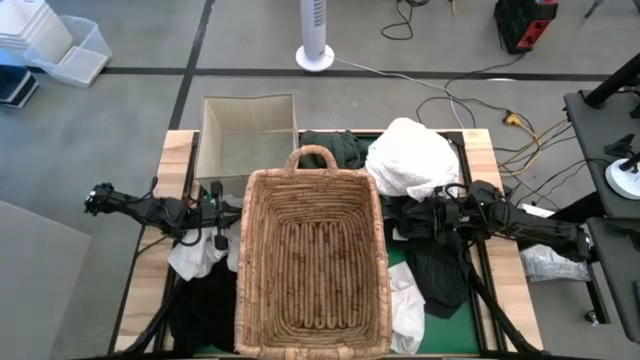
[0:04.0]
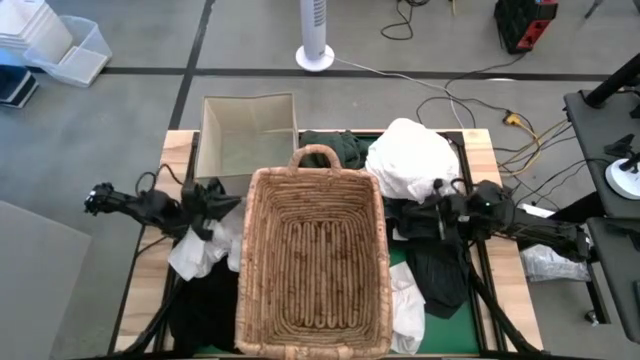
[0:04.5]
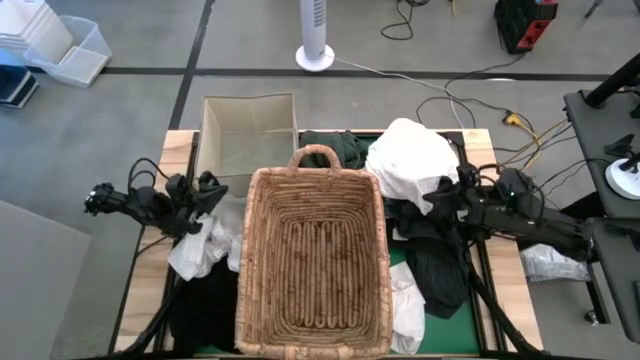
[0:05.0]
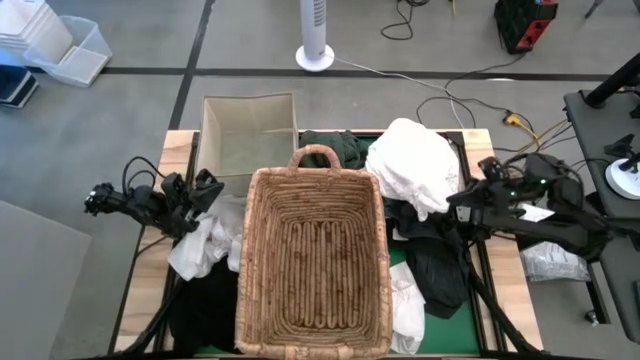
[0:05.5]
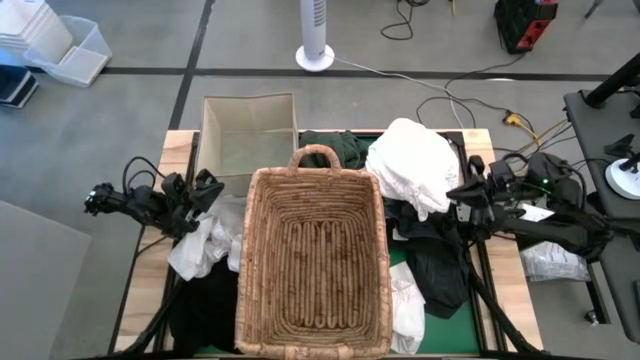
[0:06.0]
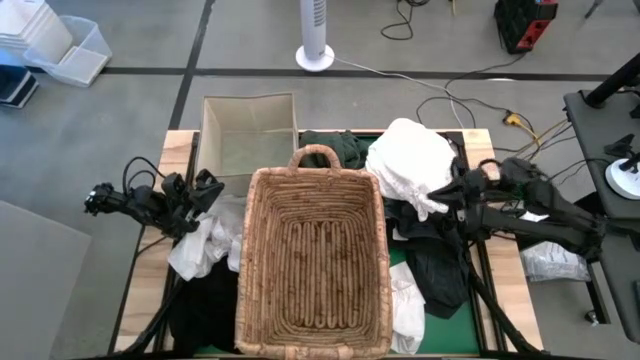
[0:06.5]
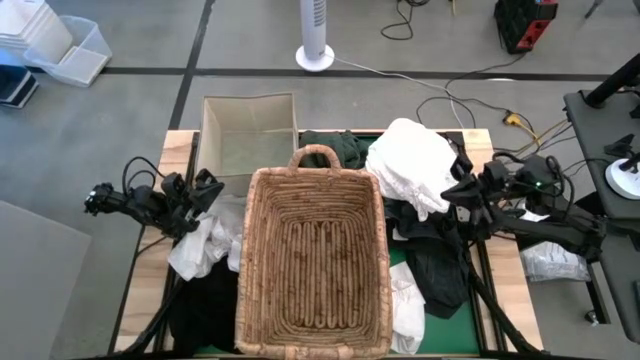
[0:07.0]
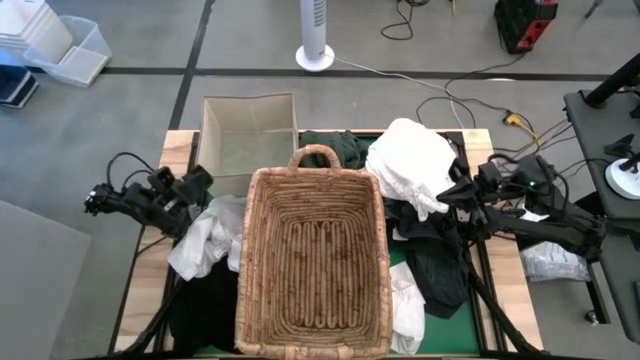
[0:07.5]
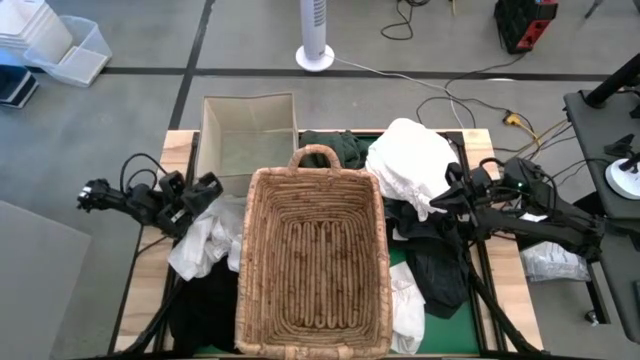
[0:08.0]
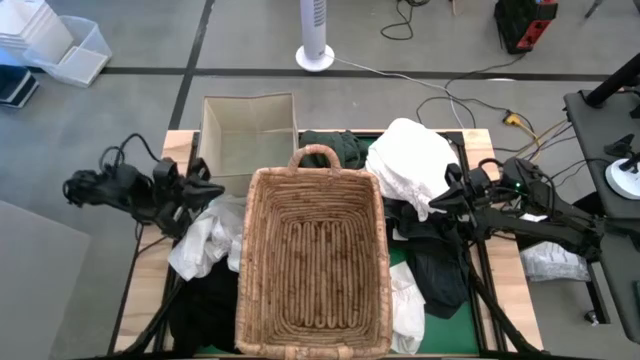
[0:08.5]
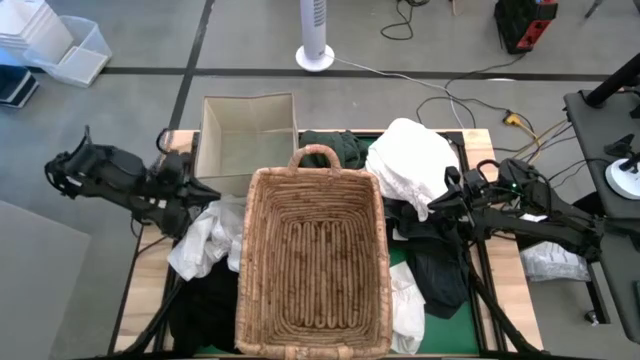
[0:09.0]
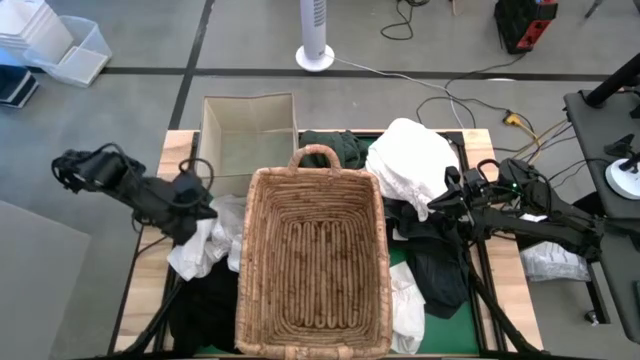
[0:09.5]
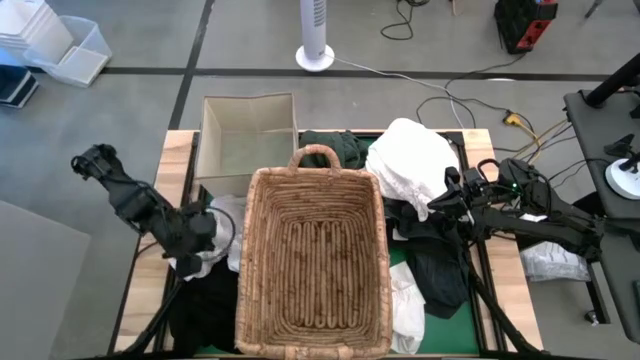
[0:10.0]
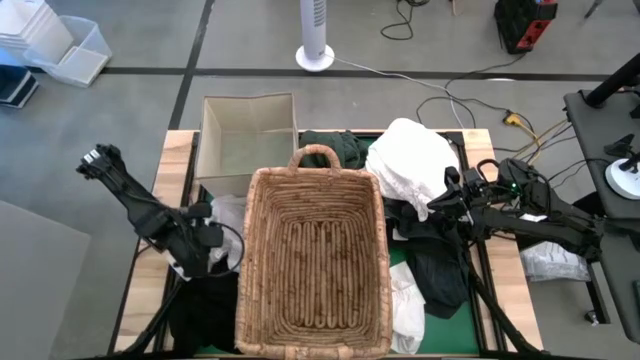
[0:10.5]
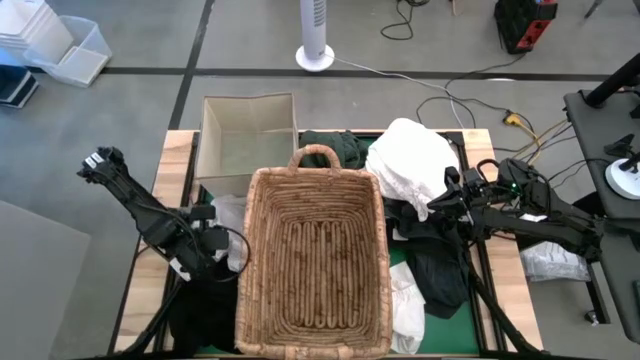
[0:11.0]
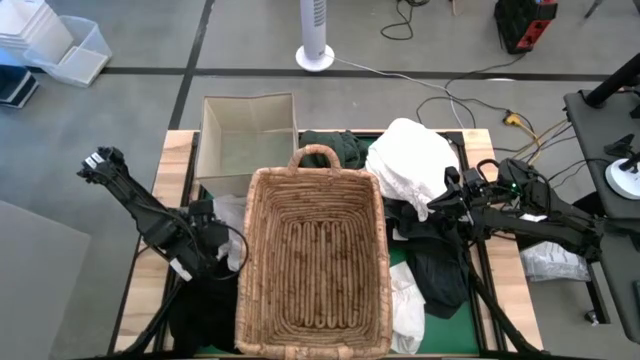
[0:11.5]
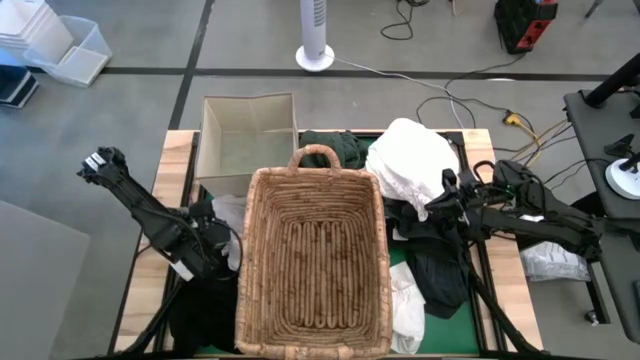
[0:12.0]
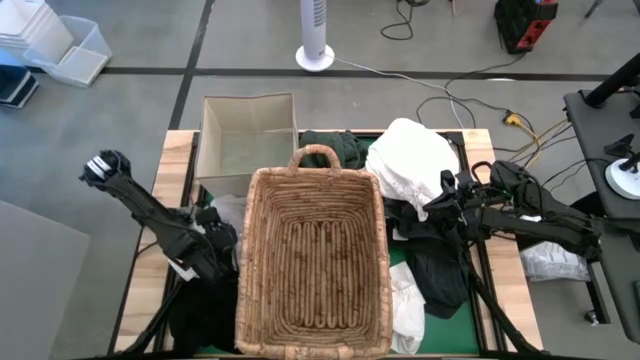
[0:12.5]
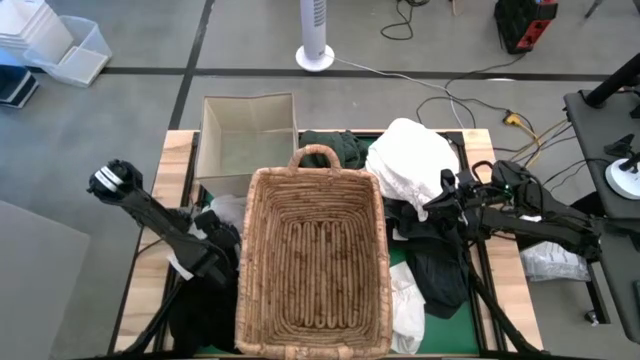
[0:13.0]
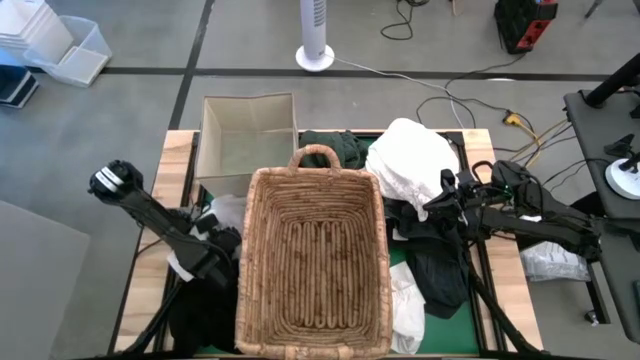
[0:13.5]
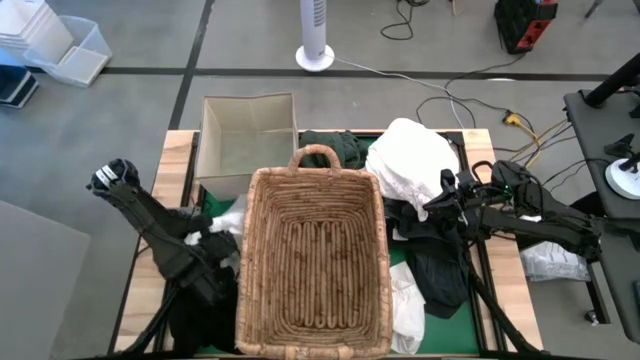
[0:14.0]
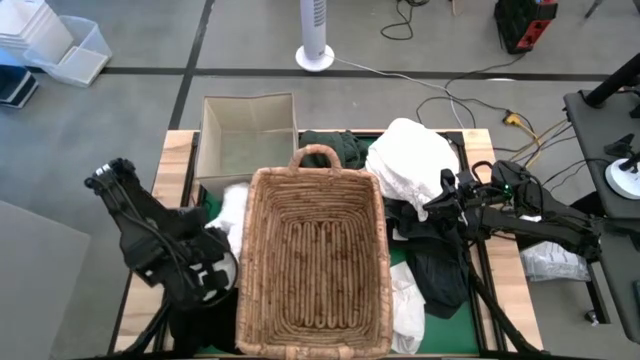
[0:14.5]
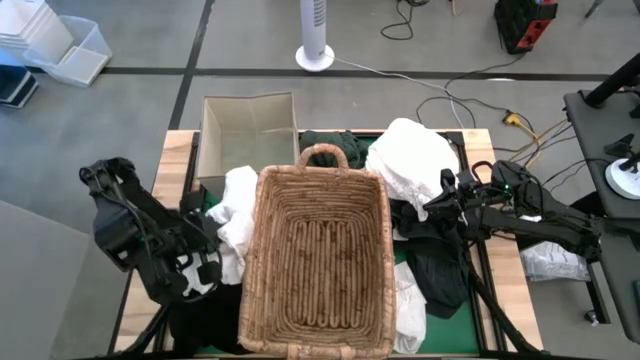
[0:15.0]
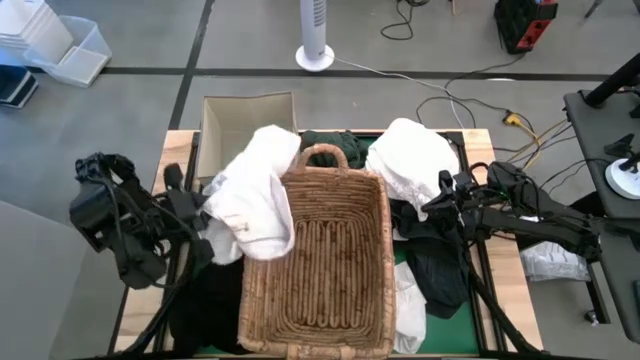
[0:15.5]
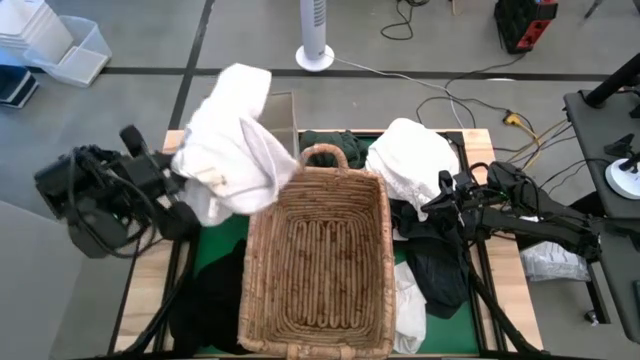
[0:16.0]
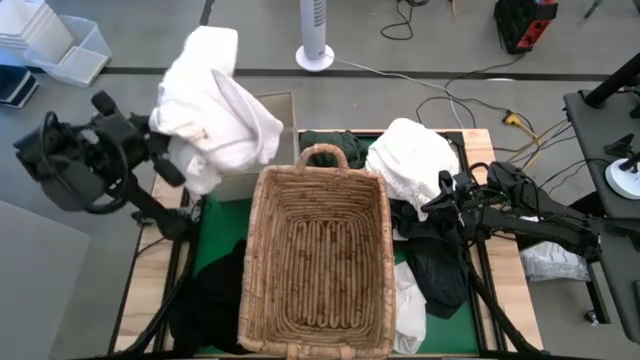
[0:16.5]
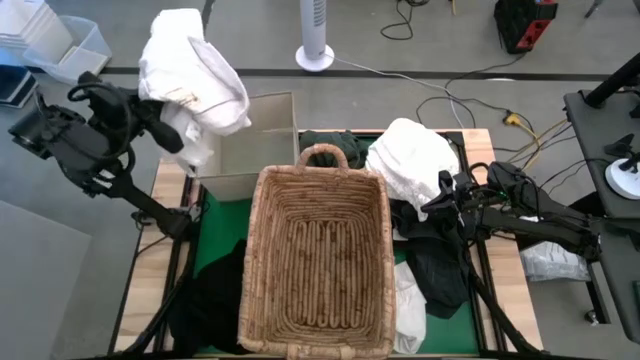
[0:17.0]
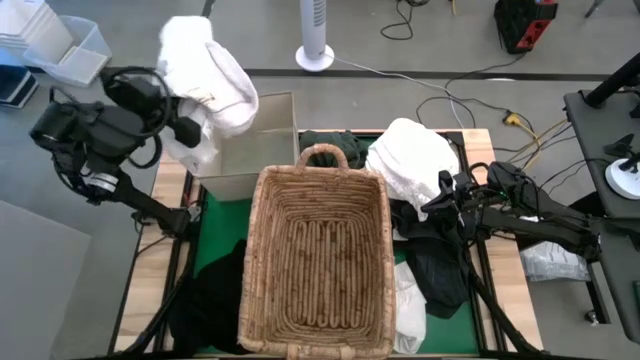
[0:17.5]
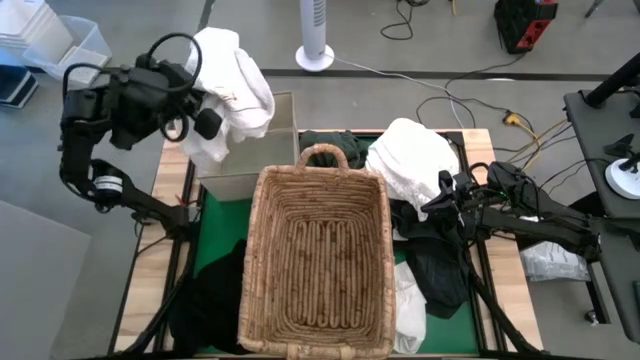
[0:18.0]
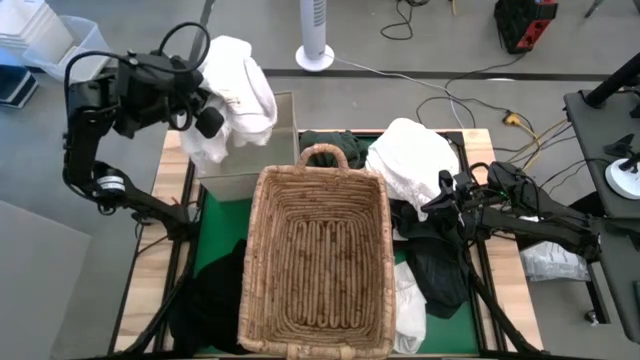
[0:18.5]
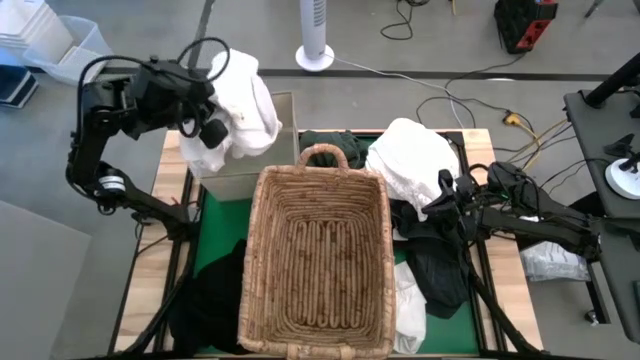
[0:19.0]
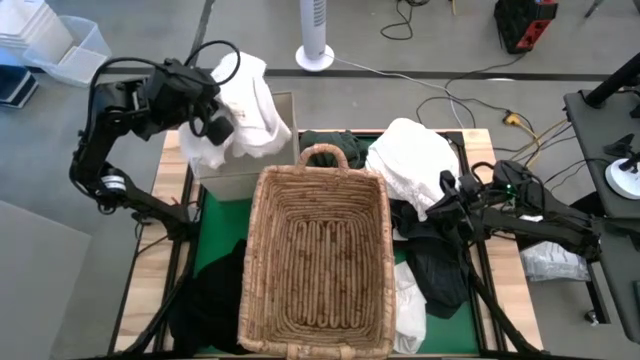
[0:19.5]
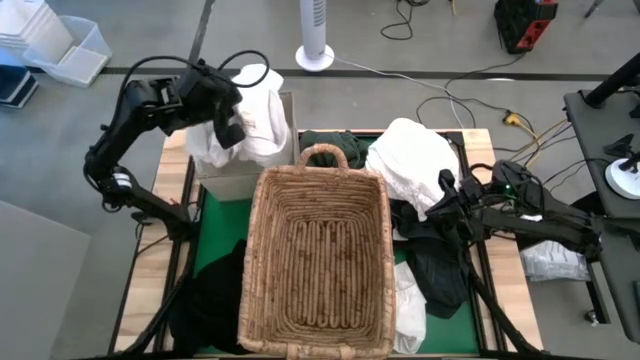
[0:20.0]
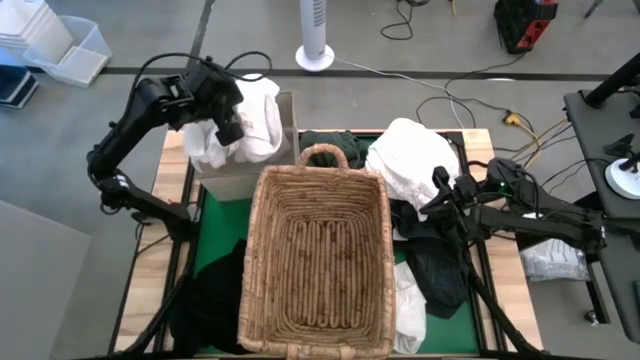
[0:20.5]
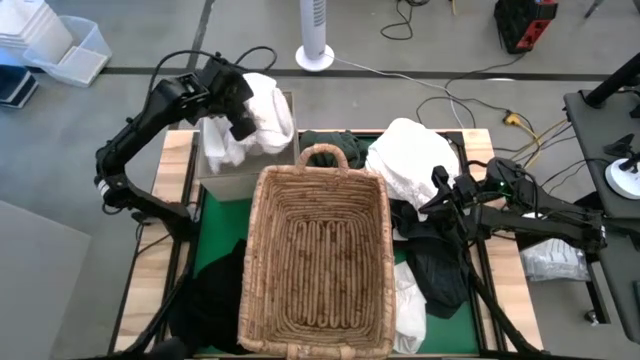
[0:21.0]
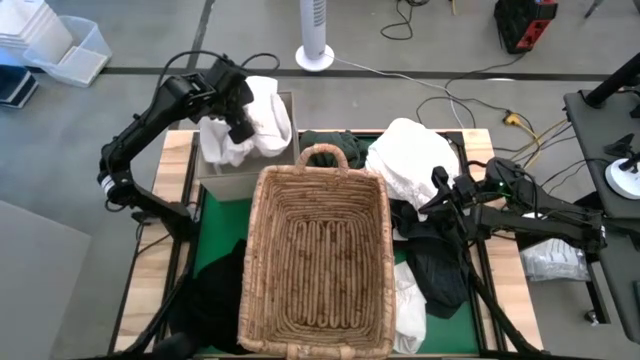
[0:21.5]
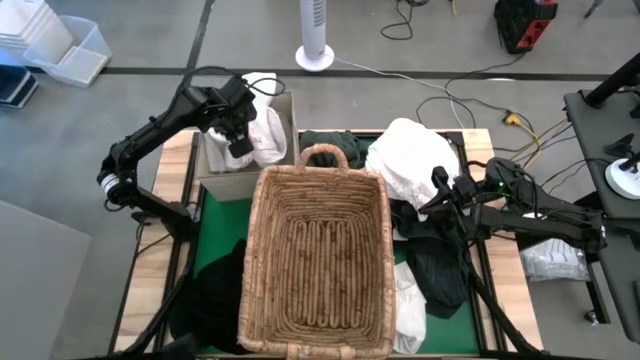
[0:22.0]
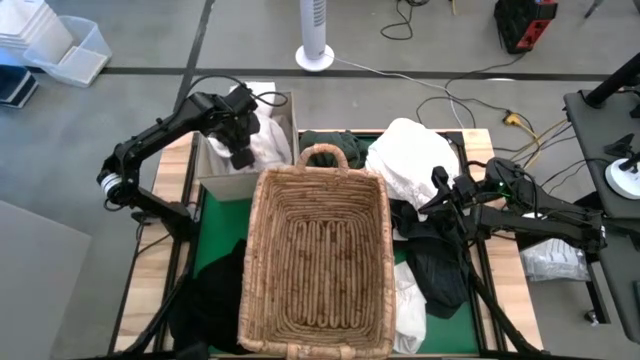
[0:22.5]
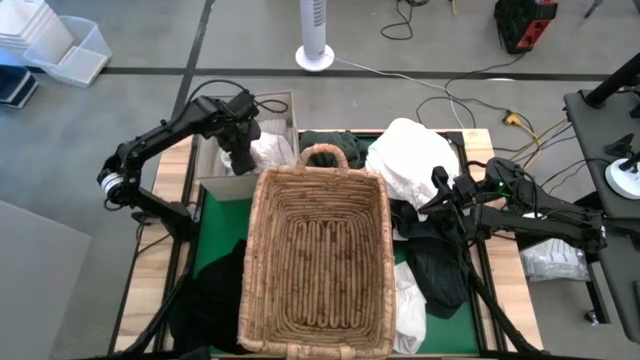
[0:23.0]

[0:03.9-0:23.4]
Put the left white shirt into the gray laundry organizer
